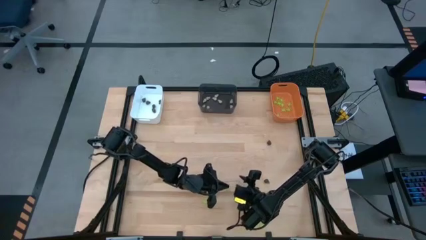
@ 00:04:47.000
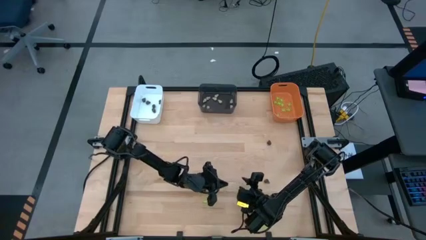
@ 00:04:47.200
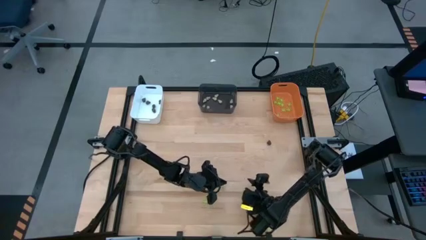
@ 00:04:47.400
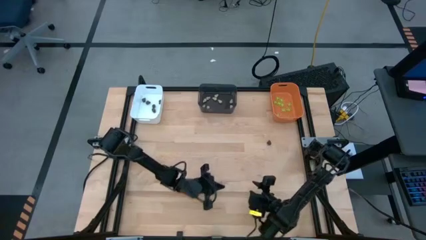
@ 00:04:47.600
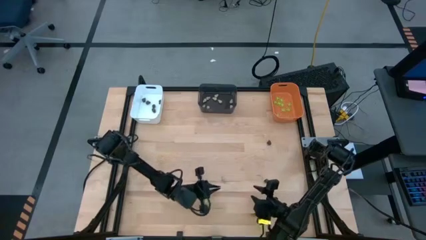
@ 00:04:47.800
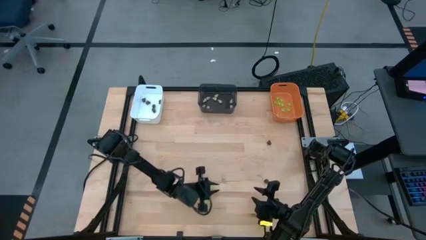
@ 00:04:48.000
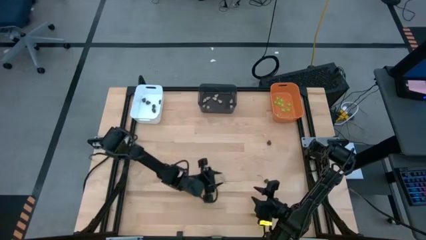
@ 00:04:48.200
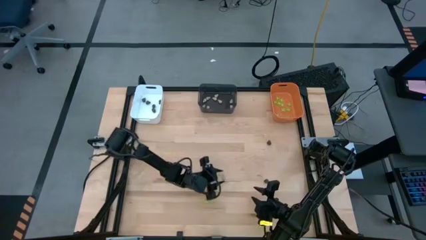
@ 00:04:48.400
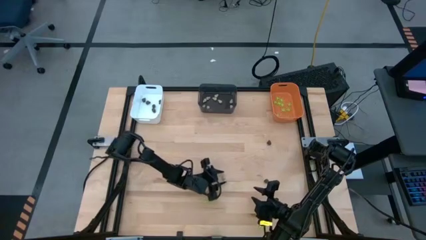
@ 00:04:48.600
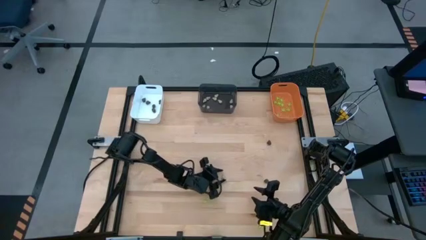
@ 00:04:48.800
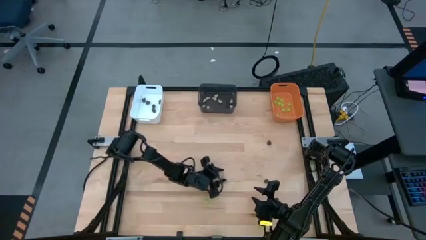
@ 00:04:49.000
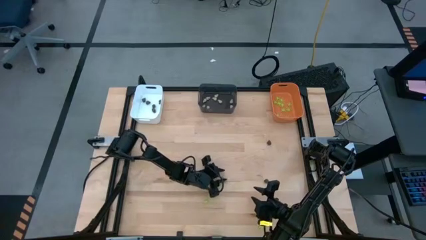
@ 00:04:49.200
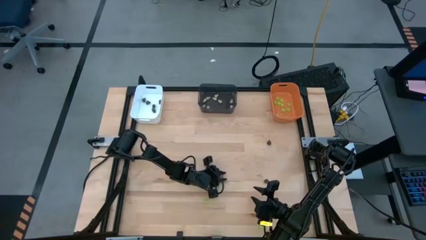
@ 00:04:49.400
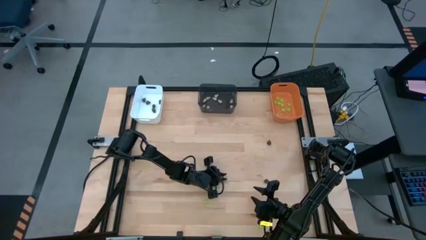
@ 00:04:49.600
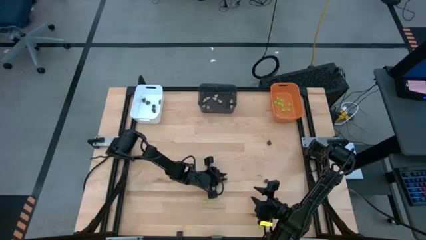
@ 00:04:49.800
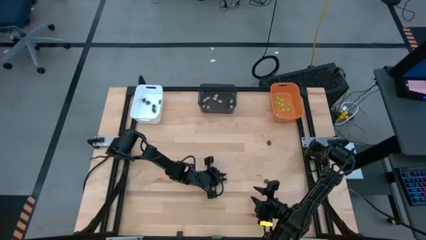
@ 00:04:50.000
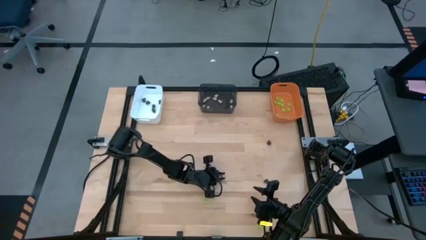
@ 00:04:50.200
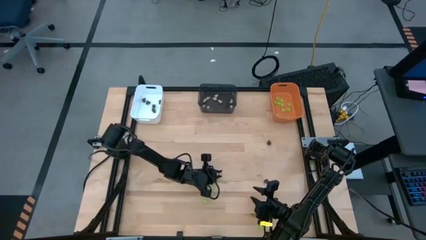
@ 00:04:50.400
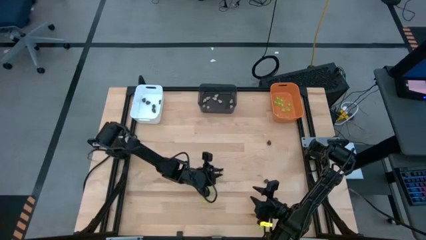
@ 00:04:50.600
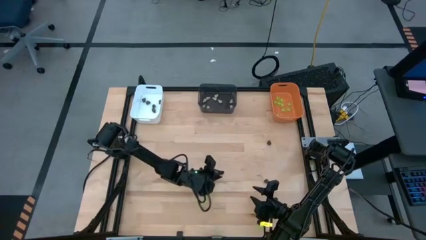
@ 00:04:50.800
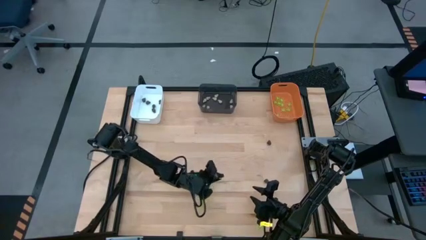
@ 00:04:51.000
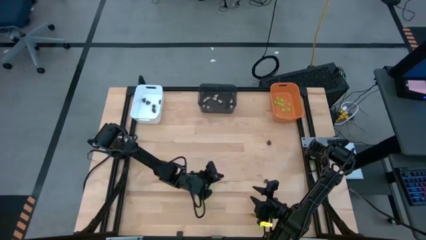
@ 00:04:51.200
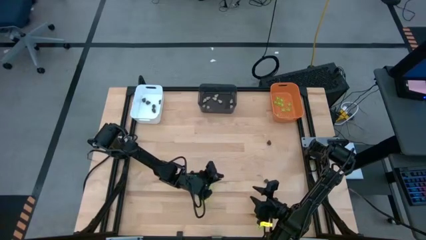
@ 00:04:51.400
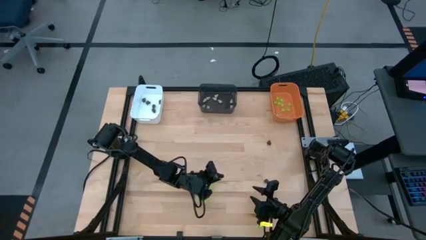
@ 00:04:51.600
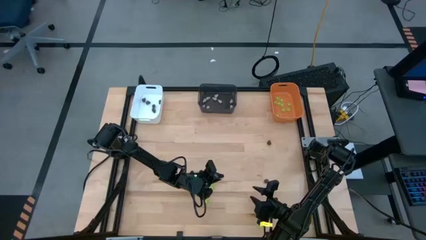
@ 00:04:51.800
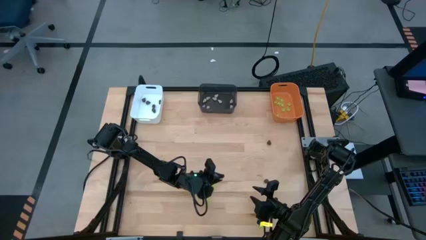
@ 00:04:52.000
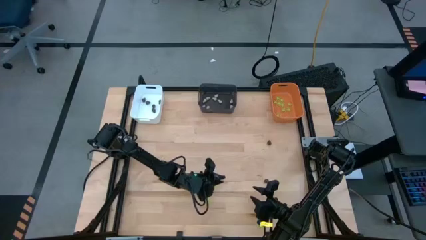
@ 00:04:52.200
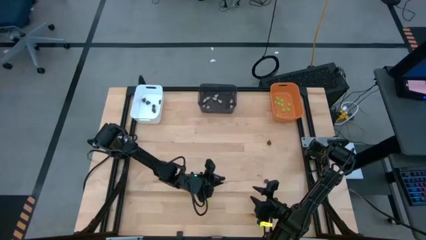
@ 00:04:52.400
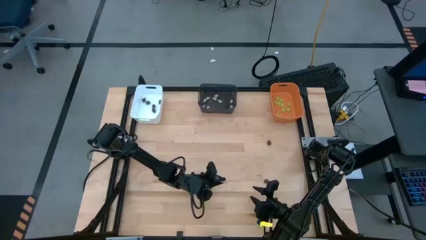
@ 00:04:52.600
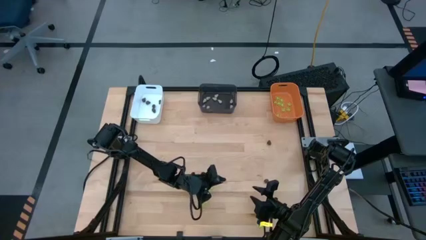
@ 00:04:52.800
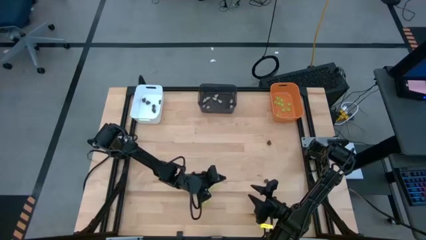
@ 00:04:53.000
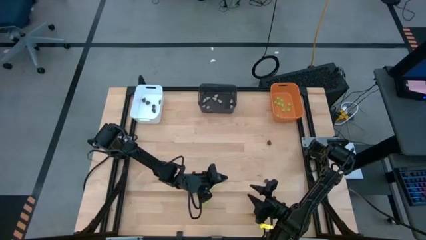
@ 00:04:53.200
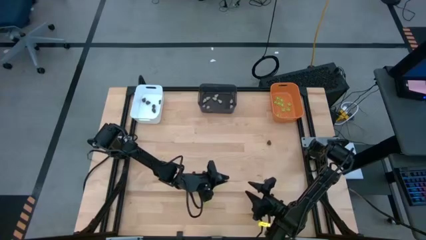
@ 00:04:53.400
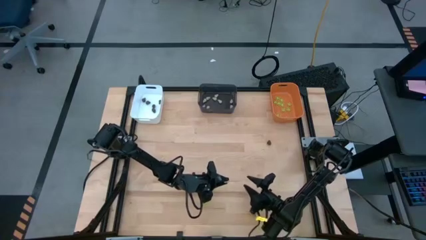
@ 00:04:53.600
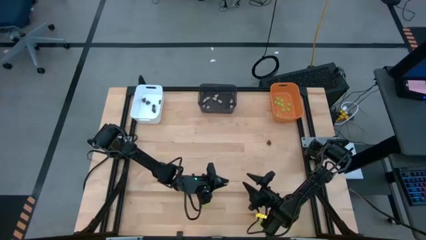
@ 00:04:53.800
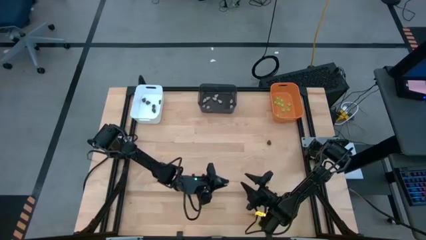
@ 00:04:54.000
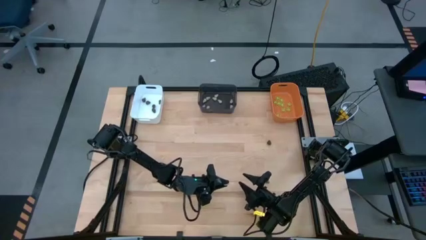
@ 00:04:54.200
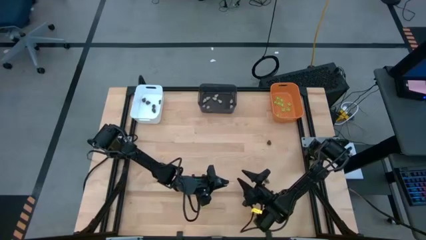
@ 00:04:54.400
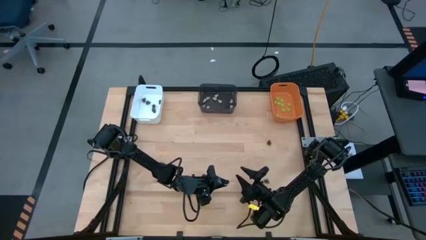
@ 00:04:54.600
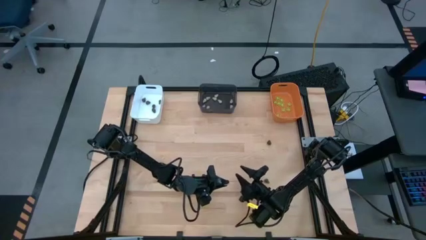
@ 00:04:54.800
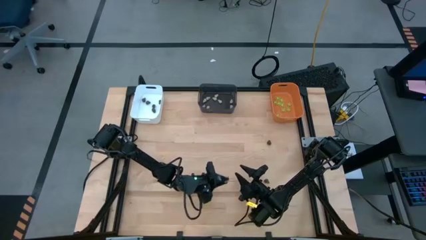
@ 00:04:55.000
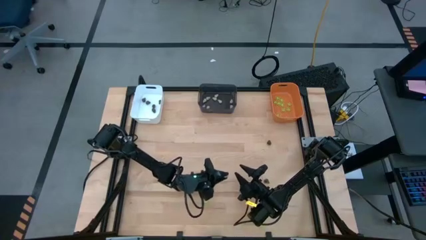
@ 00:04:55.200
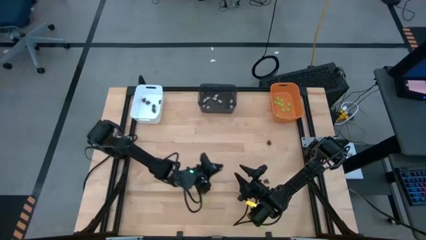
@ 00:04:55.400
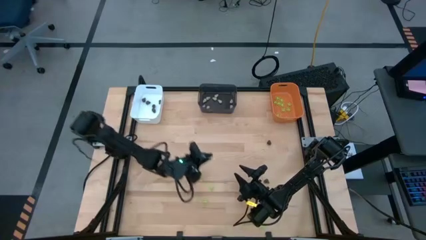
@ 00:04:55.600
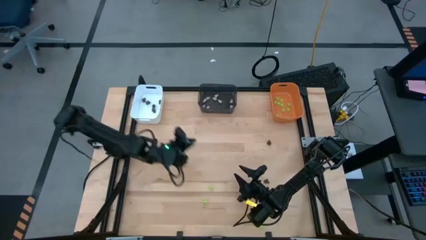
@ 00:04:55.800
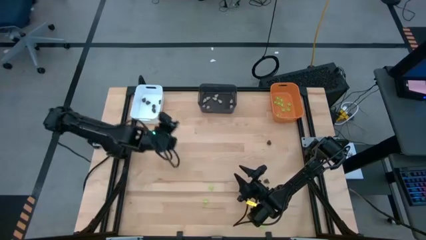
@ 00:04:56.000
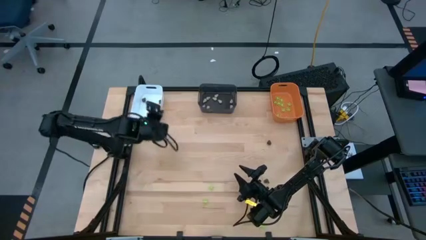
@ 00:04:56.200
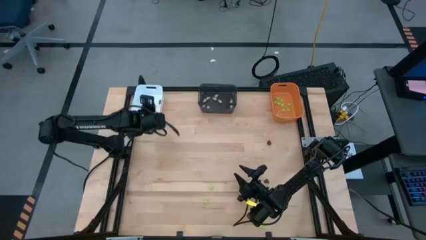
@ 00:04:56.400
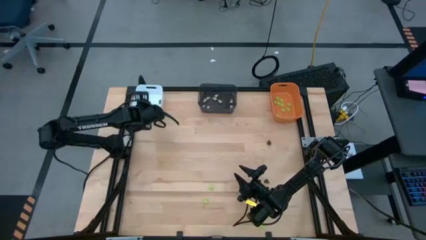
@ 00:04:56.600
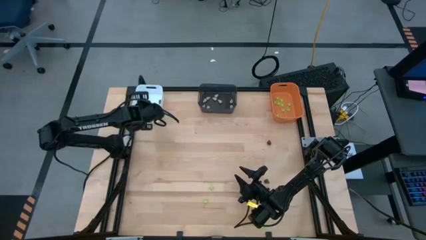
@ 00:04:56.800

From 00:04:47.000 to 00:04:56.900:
Task: Sort Halloween decoration
Put the white toy skull into the black bin

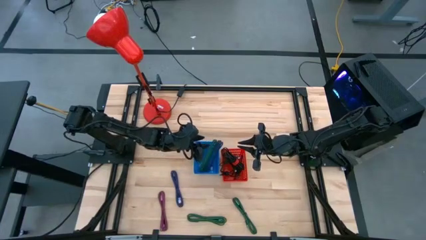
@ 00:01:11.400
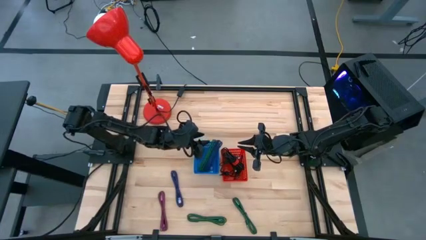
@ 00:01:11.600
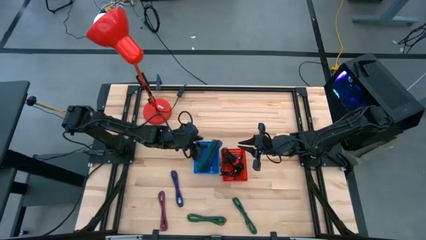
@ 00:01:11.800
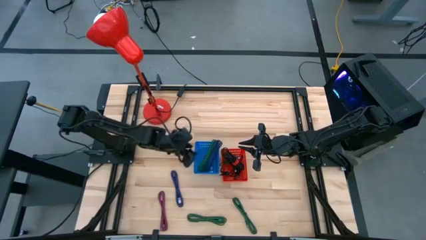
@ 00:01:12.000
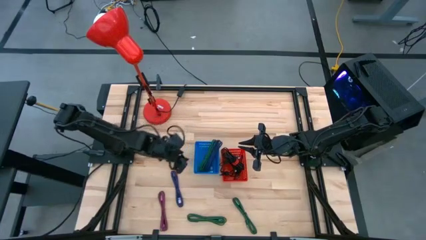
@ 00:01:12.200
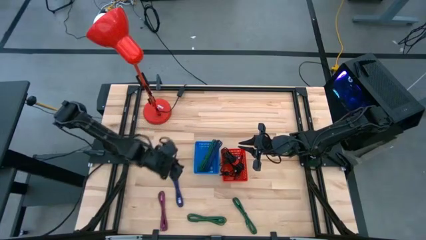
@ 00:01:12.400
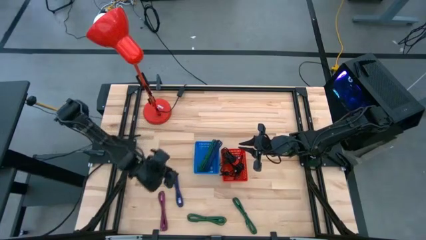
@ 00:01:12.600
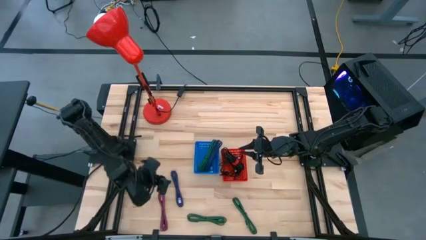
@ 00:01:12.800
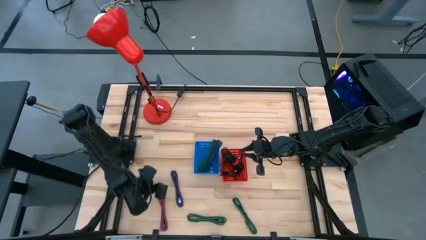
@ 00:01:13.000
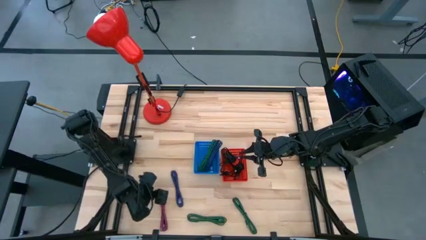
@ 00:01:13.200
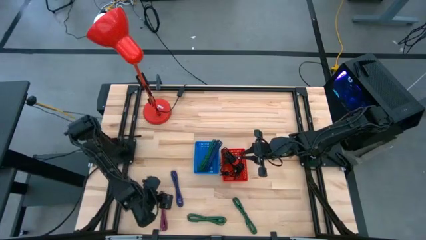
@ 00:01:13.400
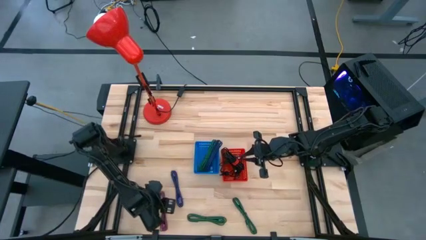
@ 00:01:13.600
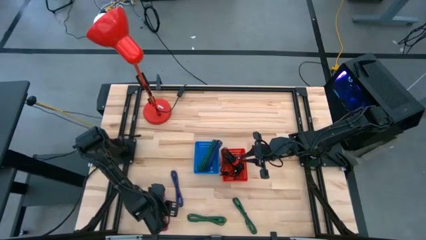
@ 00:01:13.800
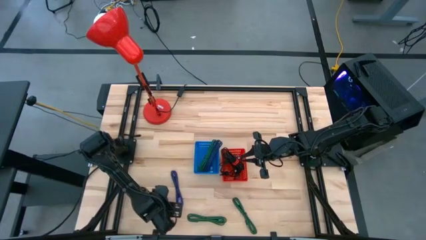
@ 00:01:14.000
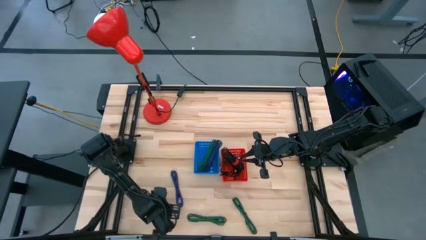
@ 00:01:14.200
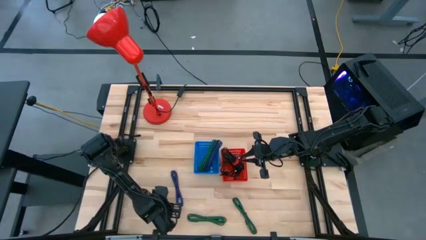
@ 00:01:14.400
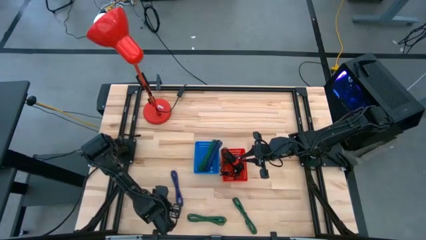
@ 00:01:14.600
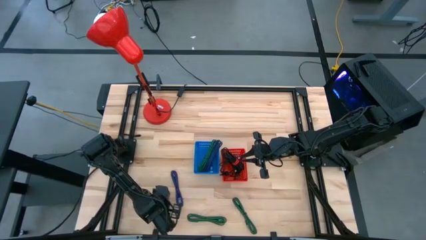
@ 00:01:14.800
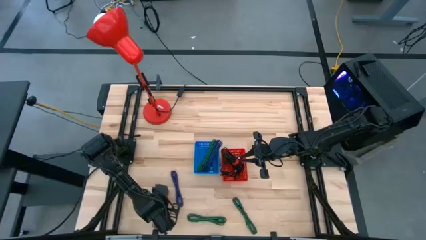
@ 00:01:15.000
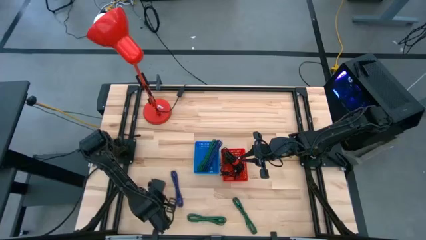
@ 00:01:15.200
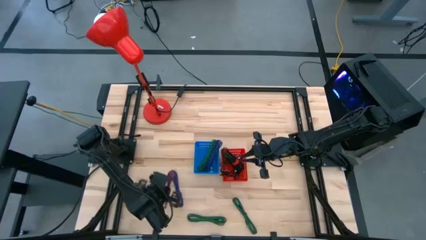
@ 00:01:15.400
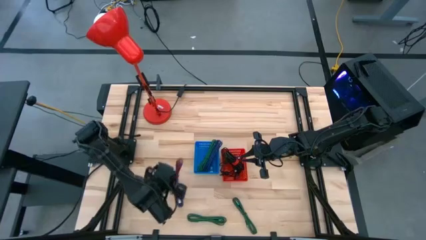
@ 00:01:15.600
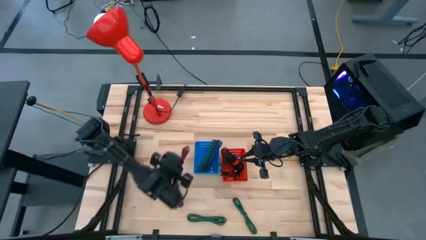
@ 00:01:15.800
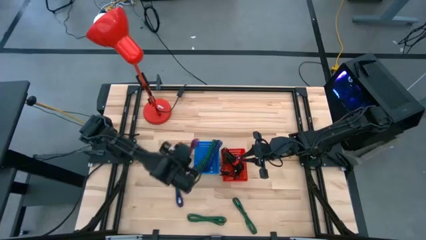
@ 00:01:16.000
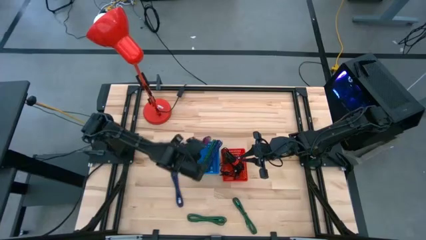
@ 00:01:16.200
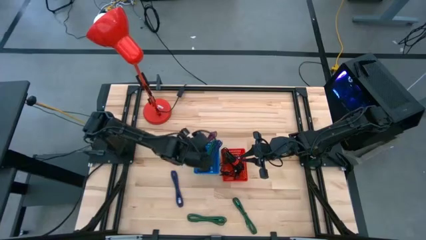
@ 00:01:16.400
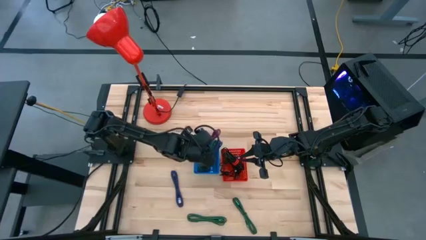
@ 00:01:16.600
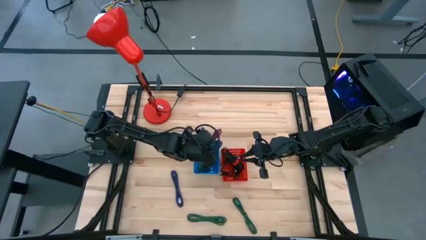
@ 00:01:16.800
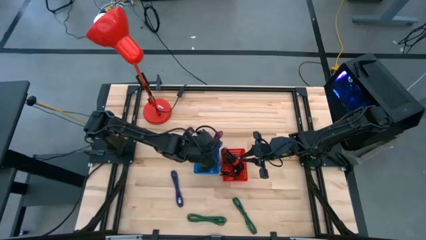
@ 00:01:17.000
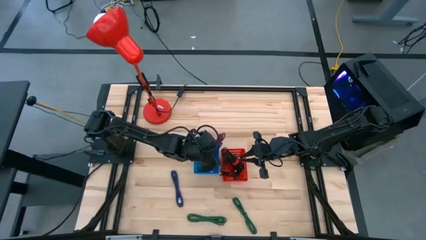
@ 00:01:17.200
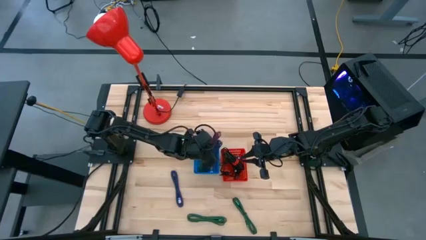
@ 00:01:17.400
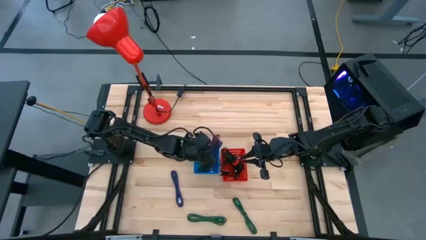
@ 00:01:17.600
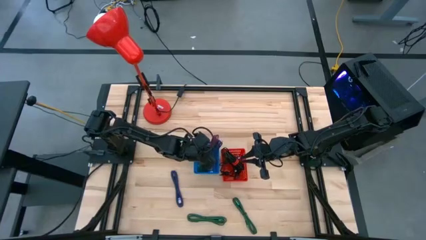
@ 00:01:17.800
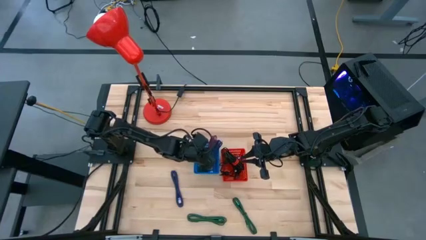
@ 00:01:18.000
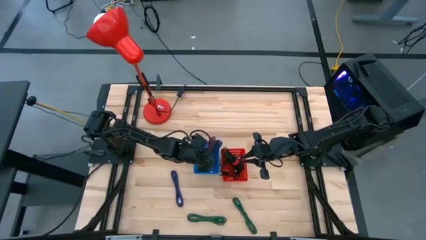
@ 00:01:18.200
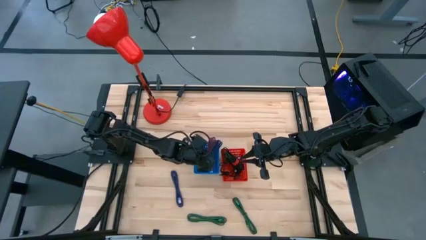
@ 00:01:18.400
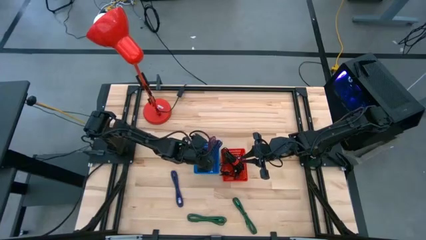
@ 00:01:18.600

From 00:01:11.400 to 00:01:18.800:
Task: Pick & Place USB Port
Put the pink charger cable into the blue bin
